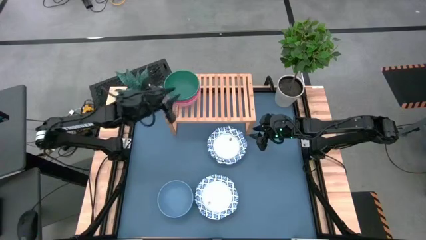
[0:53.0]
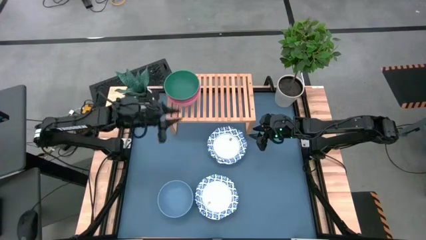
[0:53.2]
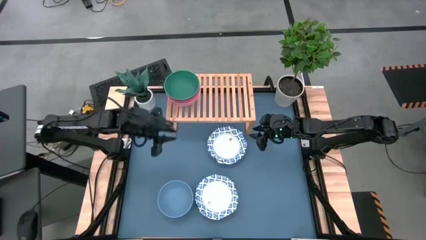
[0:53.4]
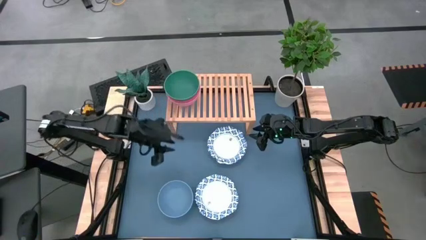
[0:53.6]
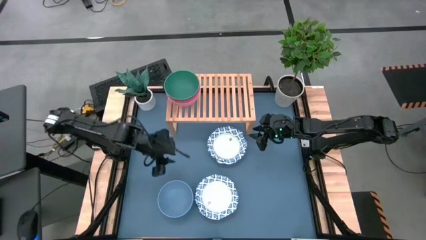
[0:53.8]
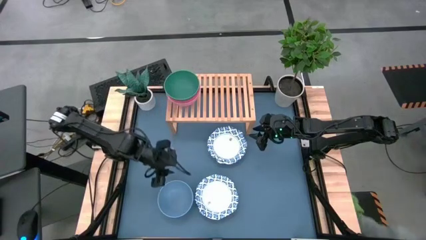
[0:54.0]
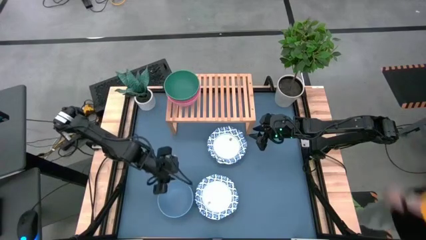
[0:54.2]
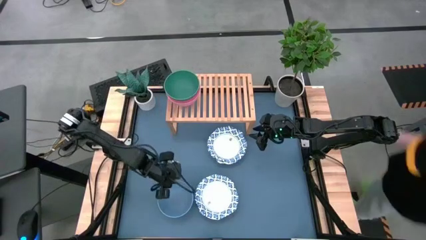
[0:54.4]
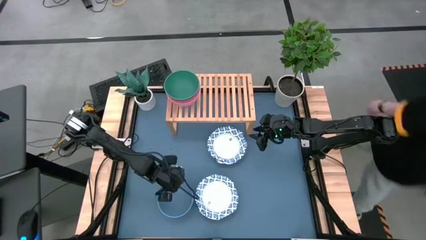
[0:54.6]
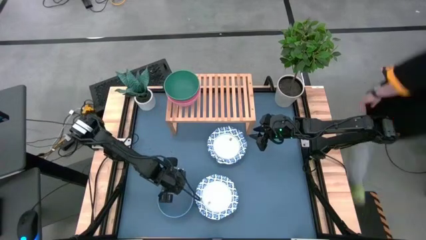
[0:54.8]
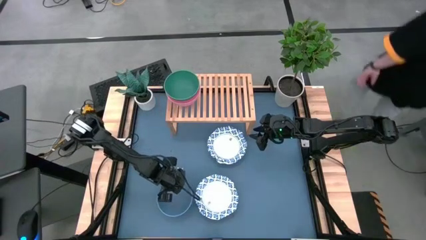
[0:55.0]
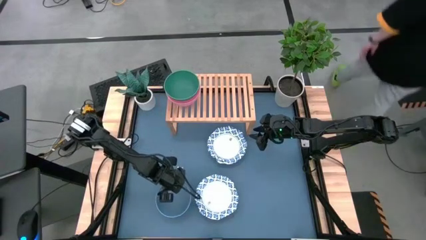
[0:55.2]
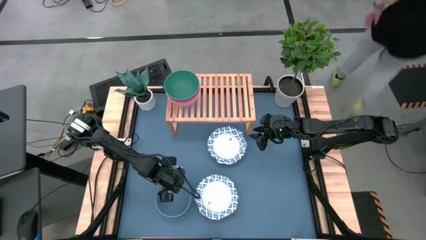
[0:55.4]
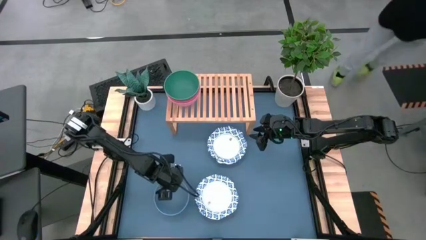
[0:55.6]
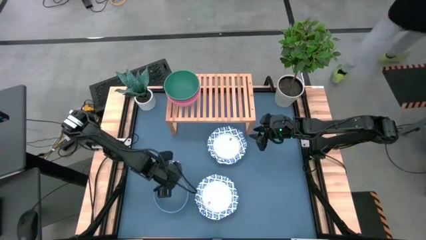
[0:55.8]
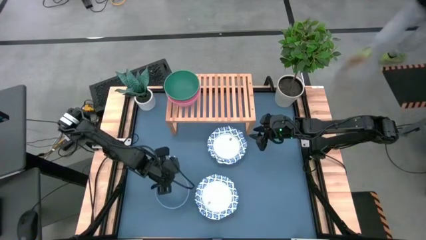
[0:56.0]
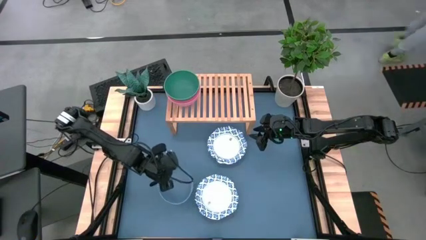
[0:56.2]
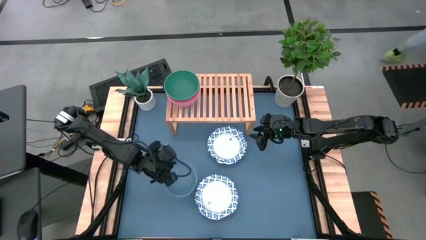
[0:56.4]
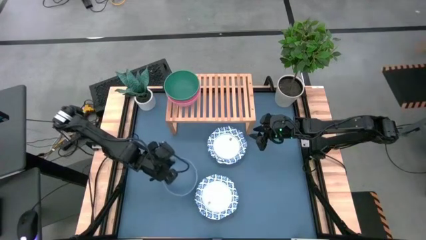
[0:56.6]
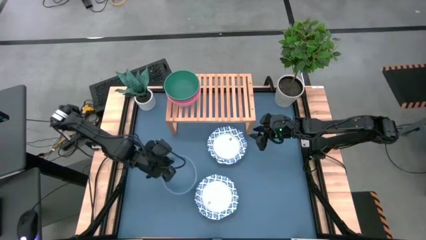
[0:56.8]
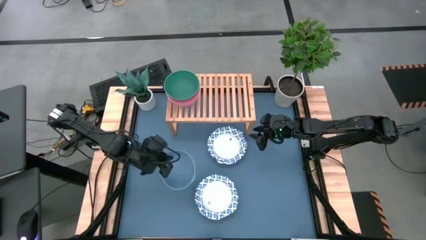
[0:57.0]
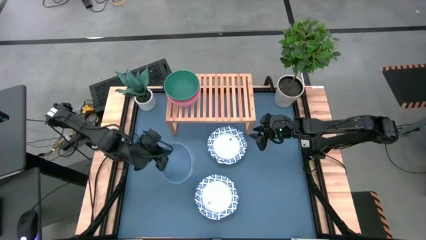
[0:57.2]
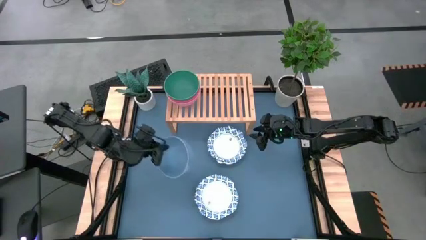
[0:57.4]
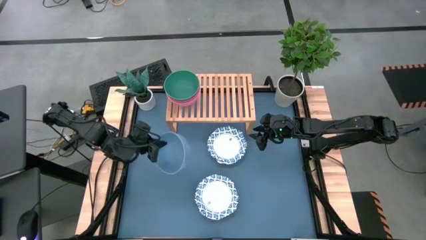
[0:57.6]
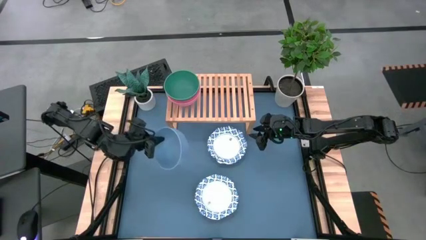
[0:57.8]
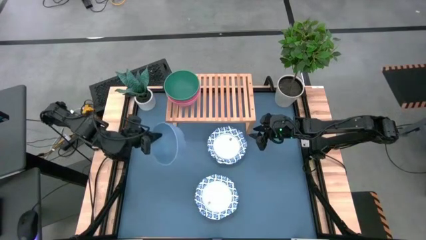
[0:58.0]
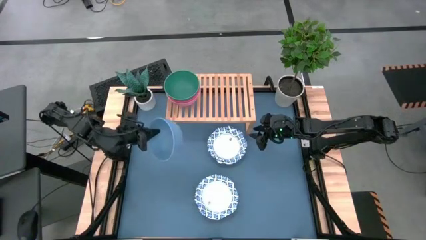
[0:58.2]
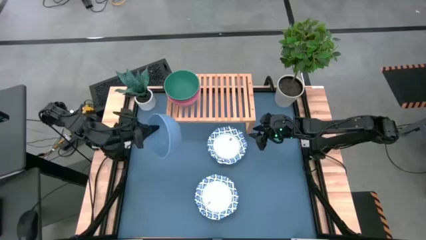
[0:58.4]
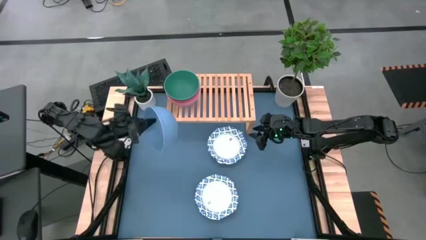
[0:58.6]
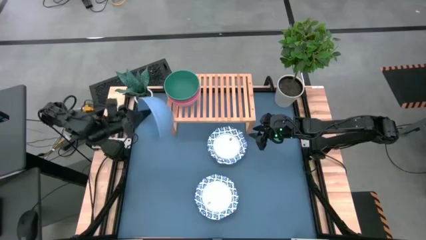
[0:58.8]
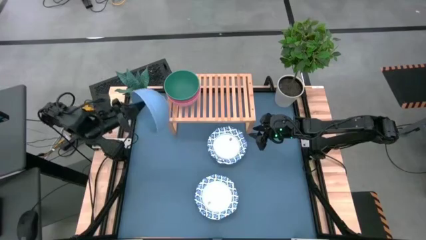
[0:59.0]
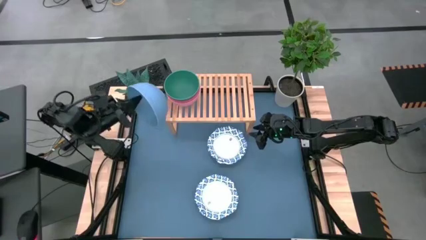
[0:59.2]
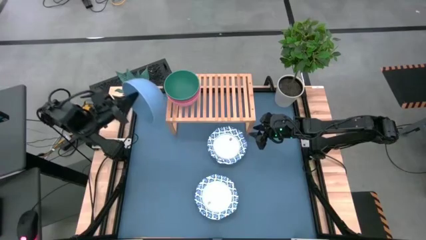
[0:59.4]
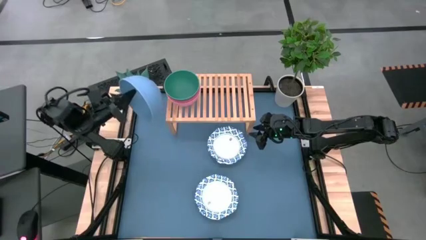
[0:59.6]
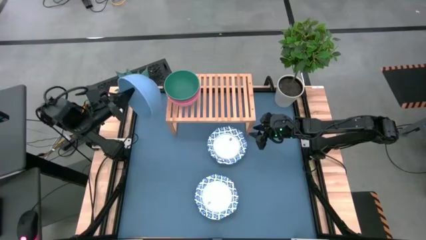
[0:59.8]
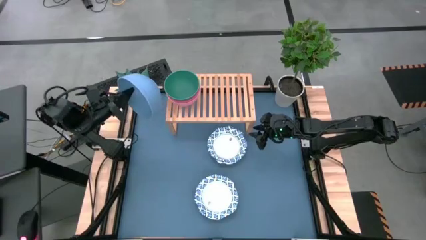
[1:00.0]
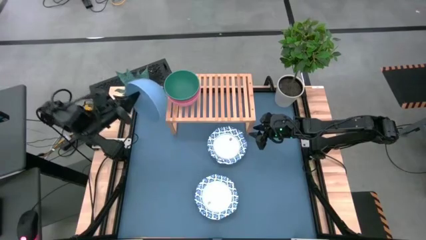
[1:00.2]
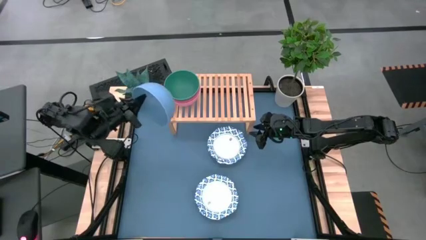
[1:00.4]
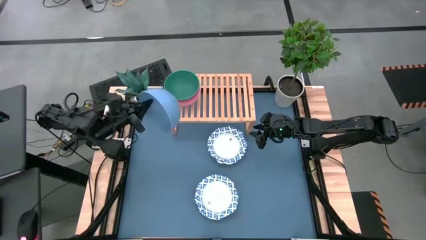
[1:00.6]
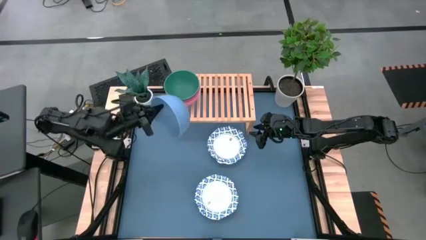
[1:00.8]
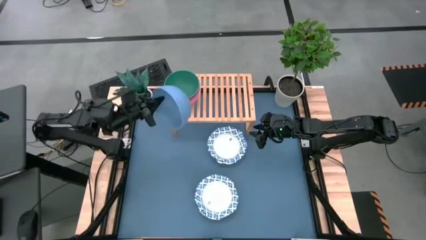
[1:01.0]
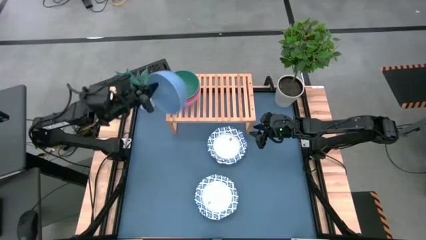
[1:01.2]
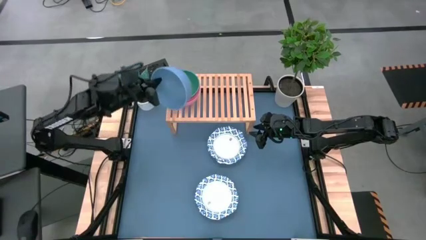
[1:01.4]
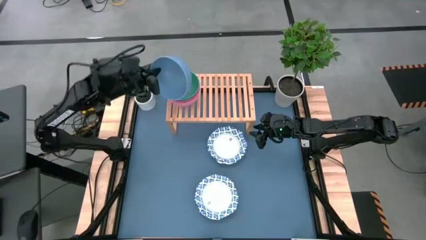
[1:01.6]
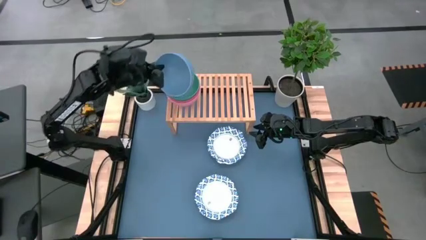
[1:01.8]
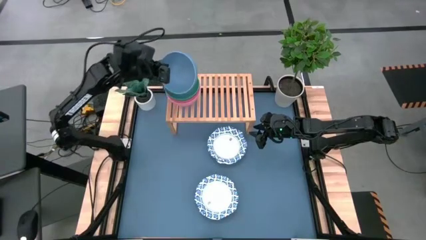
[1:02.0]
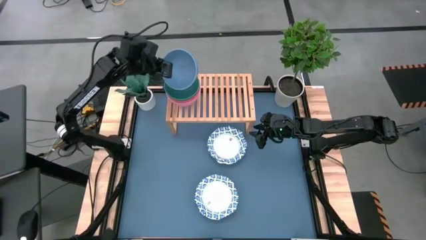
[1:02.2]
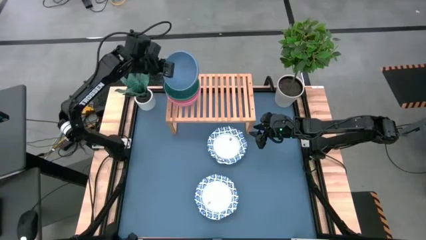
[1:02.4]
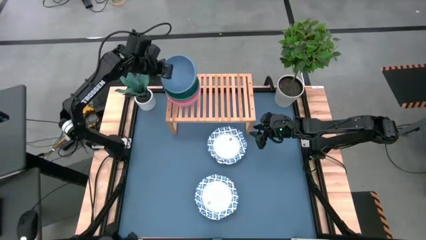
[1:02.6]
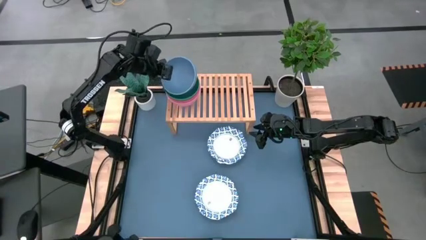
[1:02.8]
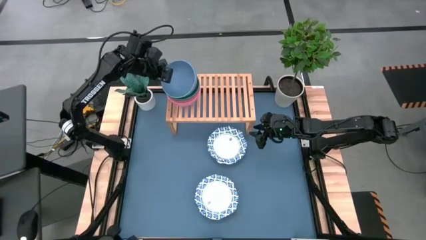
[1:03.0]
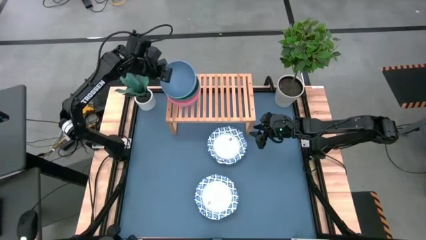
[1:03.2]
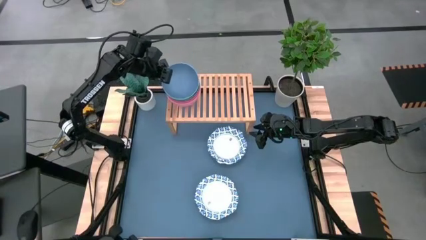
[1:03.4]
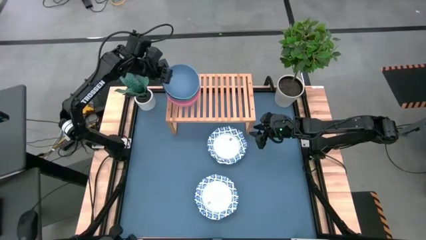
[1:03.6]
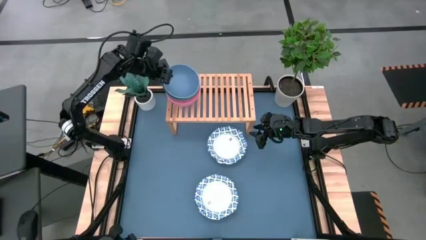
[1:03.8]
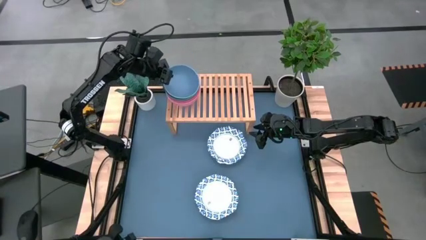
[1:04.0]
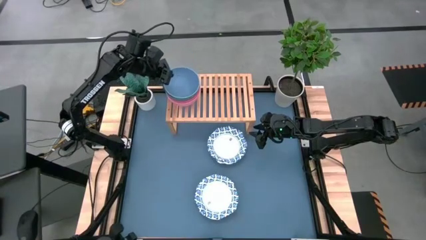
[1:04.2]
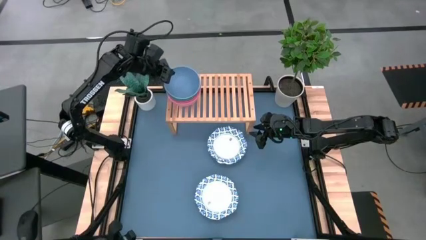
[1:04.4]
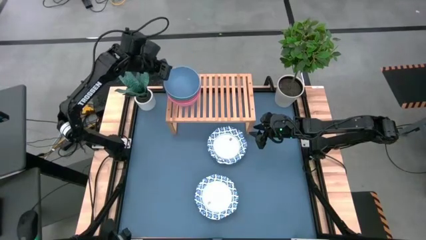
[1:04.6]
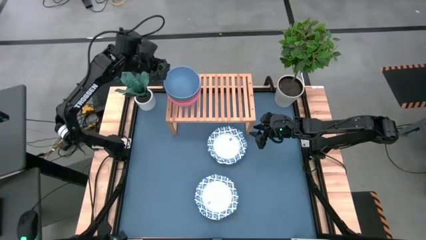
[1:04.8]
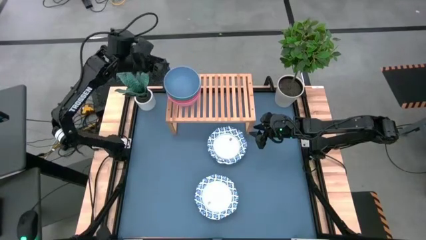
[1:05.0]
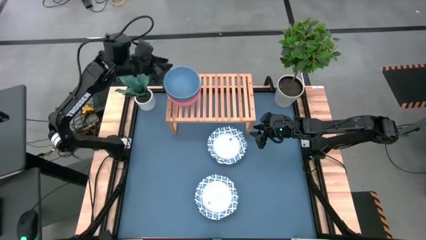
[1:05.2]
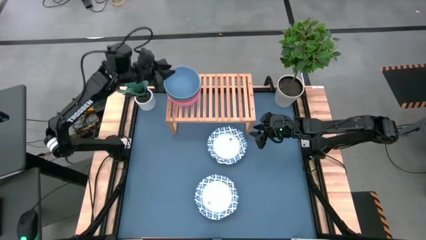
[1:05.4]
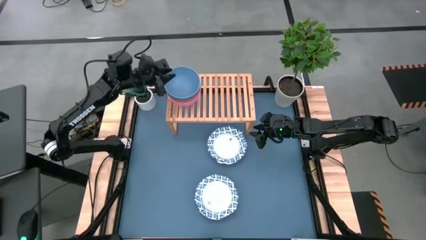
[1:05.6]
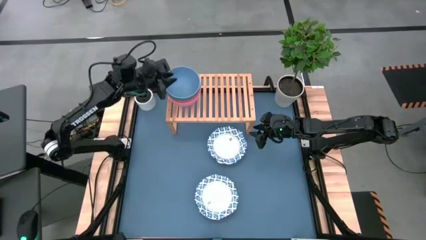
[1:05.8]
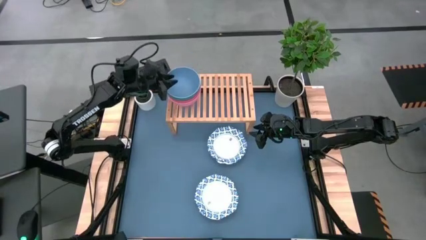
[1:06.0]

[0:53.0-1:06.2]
Task: Place and stack bowls onto a shelf
Stack the blue bowl on top of the green bowl on the shelf
